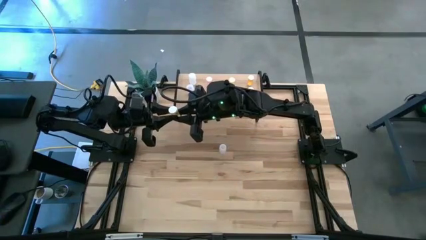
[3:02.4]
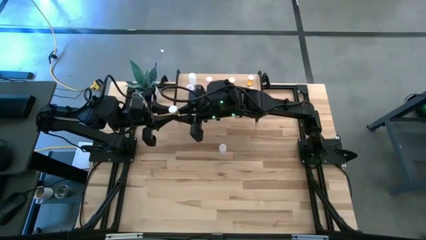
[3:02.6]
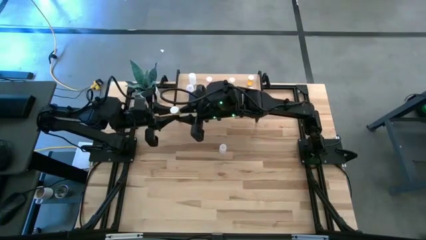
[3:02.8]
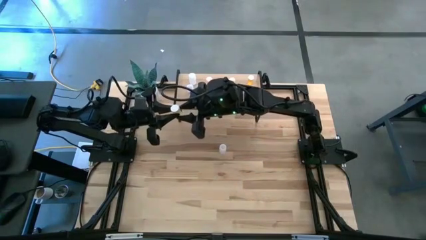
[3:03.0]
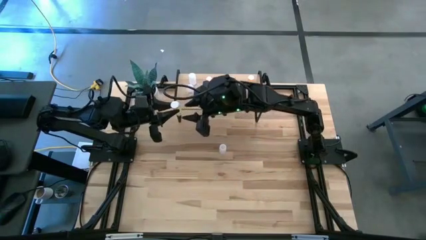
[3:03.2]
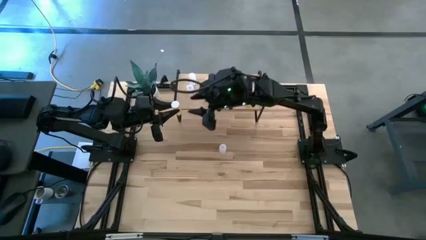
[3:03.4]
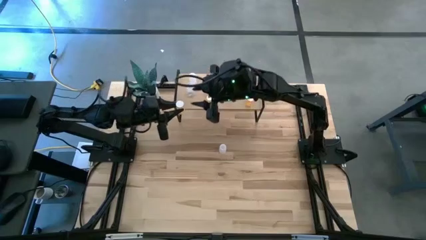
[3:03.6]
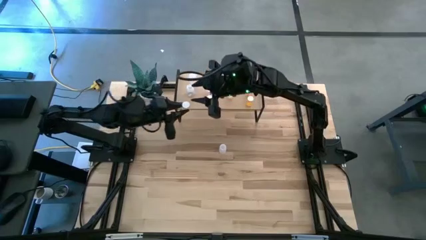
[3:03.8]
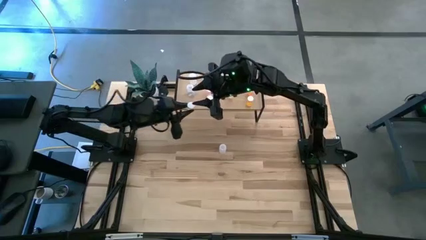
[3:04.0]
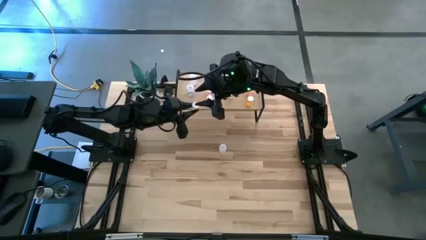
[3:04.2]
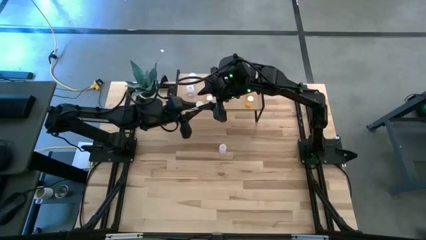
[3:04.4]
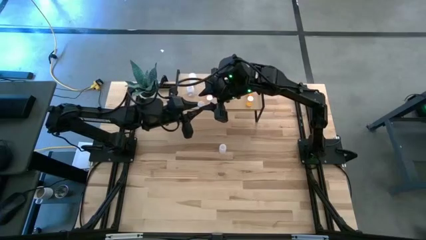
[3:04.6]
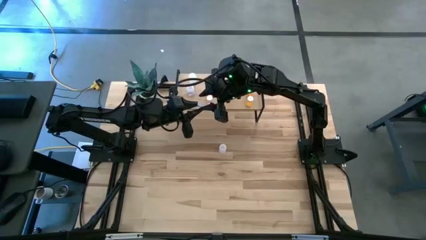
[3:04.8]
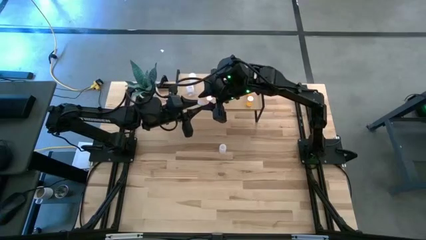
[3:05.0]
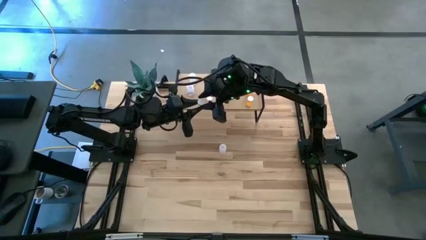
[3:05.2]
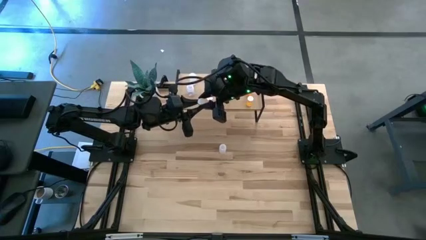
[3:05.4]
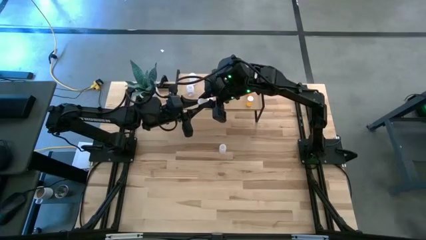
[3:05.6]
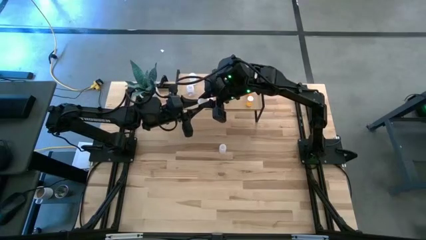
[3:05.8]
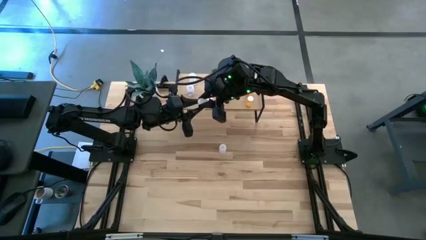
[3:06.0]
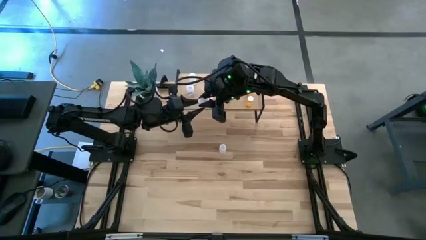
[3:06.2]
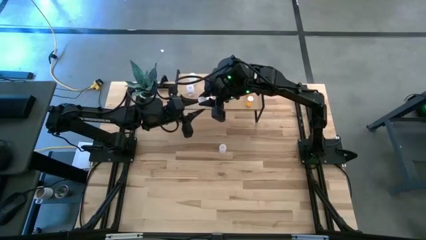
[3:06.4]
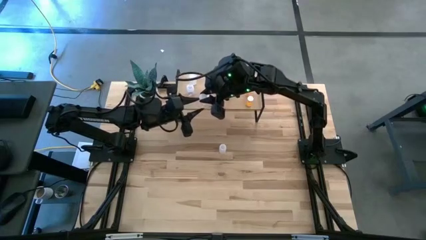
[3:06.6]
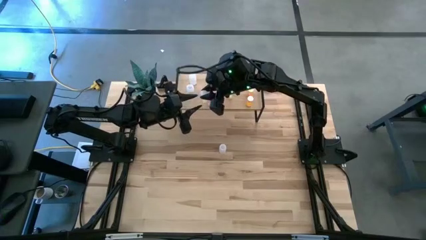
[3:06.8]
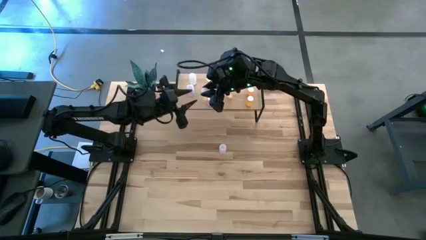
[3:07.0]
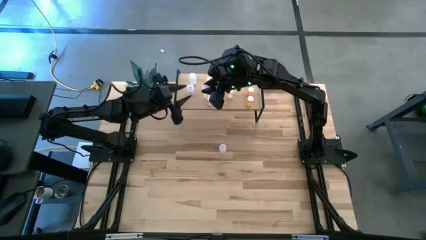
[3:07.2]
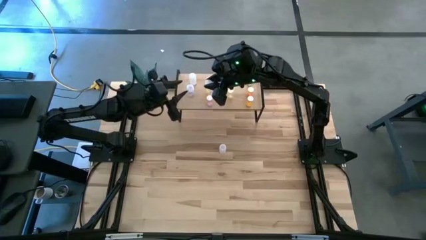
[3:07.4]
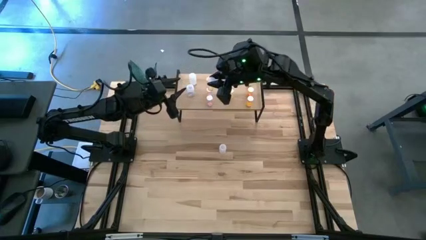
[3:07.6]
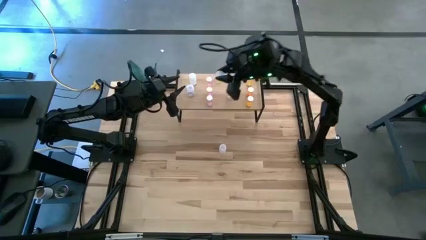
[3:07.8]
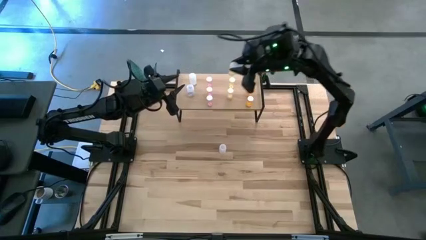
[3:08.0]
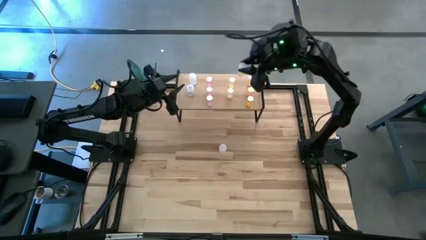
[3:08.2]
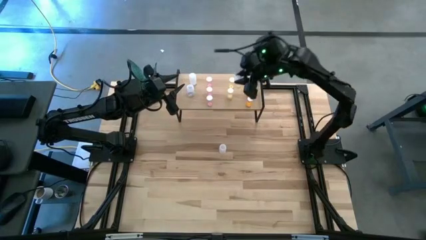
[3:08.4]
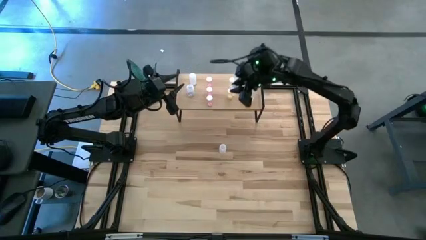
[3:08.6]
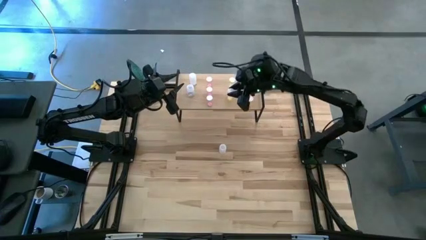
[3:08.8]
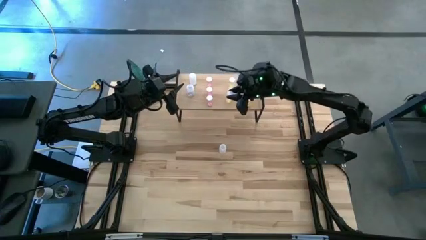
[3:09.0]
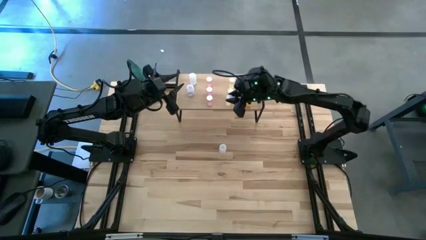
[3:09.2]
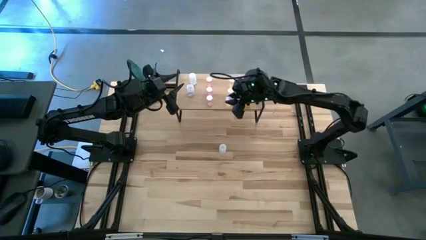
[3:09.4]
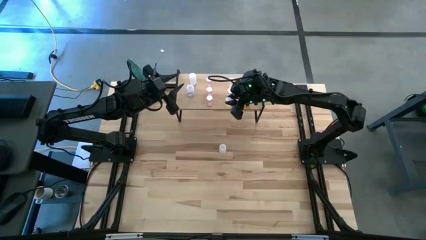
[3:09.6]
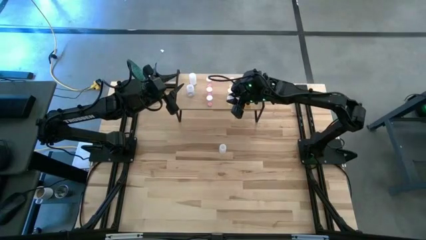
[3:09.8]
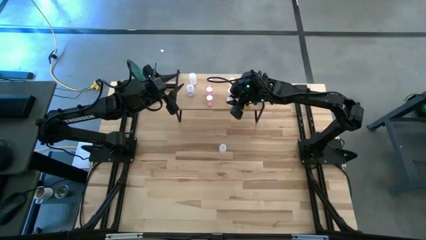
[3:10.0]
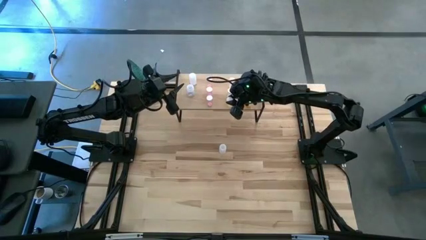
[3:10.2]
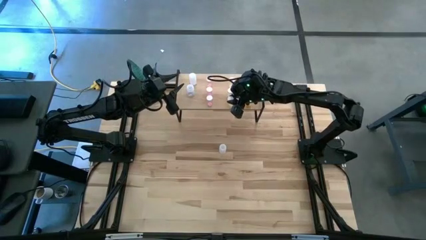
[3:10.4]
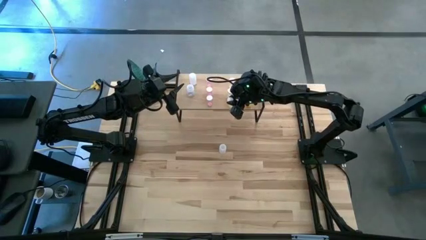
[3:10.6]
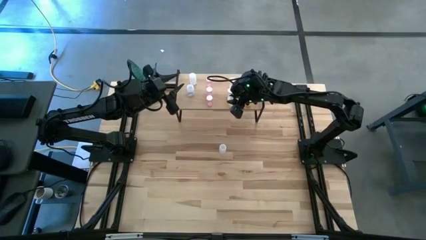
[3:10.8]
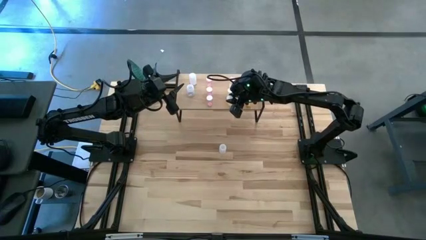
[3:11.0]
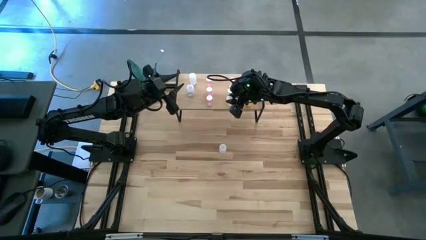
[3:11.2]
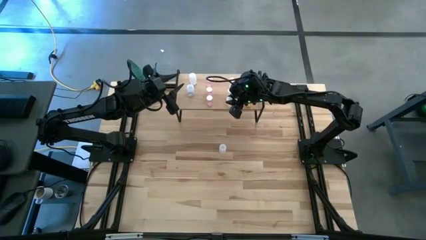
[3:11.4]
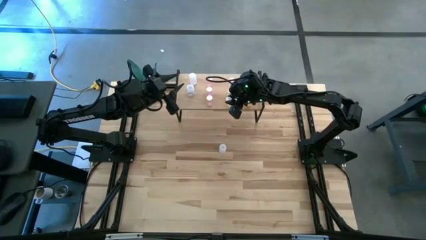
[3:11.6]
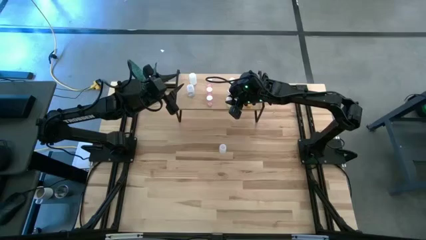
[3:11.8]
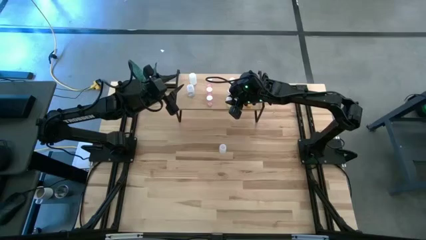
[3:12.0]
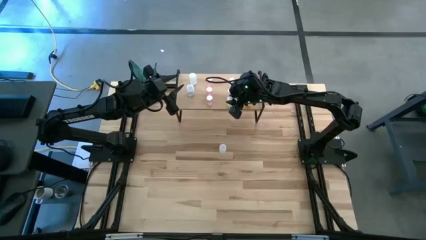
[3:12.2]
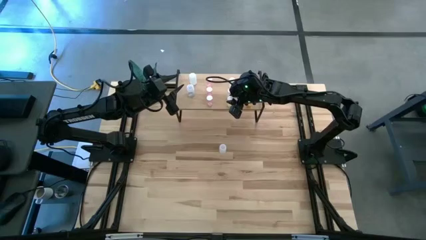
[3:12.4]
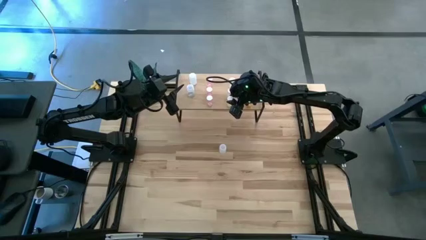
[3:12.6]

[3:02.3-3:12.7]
Task: Pick and place medicine bottles onto shelf by color
Put the yellow pill bottle aligned with the other yellow pill bottles on the shelf
